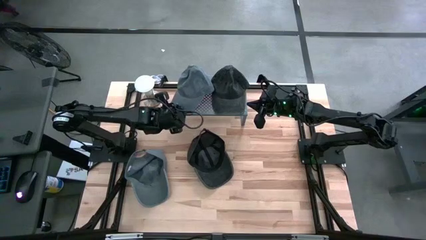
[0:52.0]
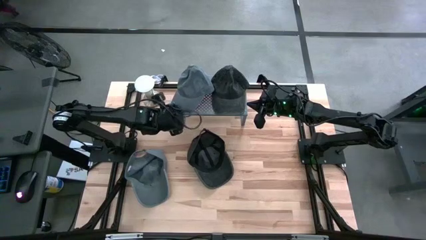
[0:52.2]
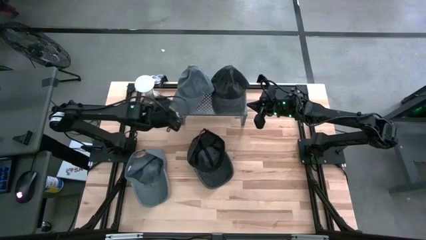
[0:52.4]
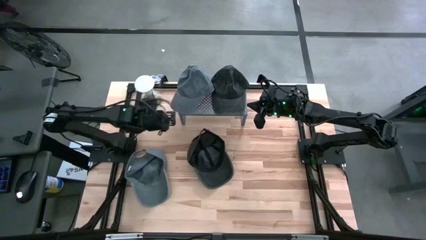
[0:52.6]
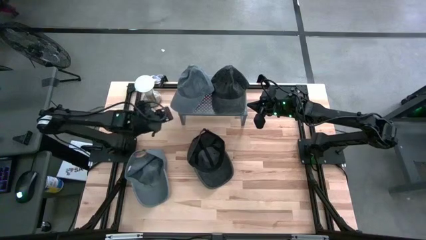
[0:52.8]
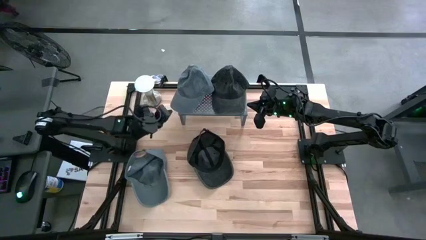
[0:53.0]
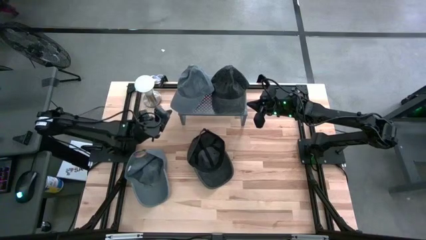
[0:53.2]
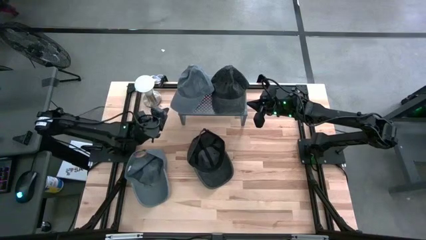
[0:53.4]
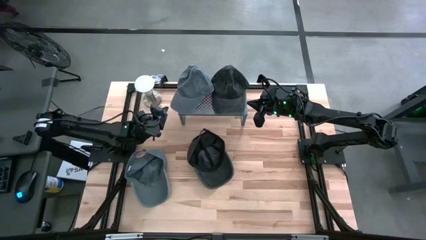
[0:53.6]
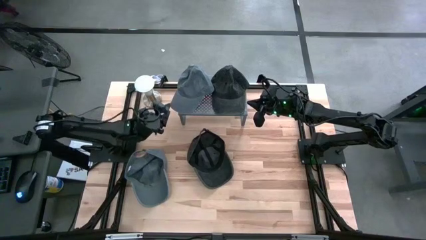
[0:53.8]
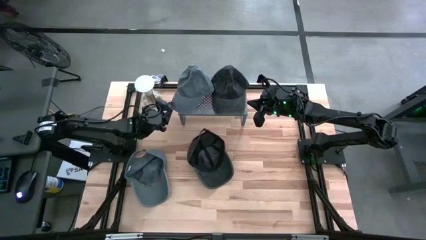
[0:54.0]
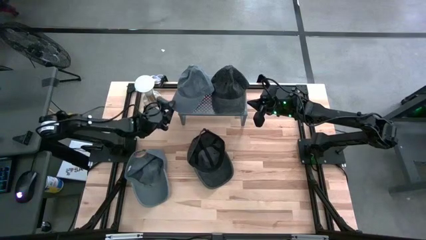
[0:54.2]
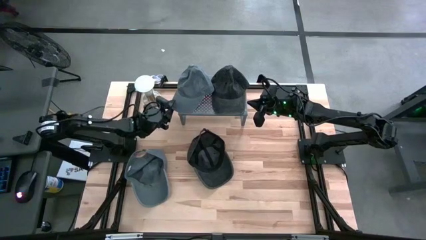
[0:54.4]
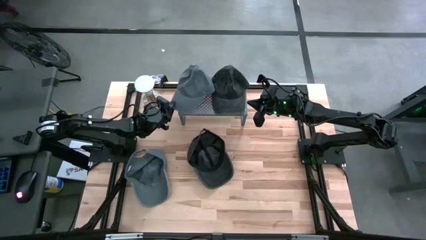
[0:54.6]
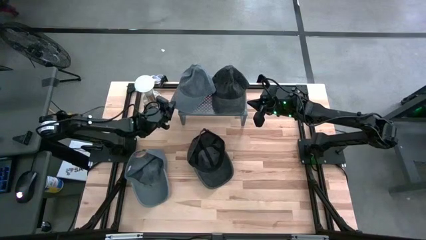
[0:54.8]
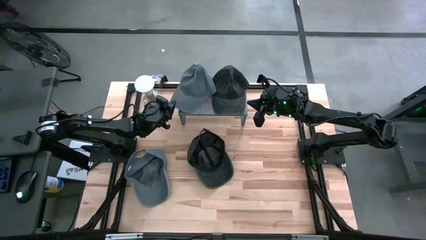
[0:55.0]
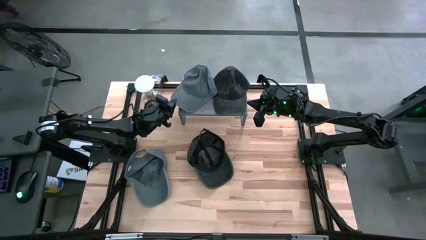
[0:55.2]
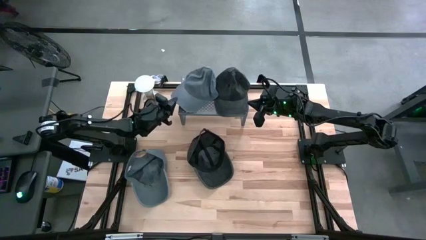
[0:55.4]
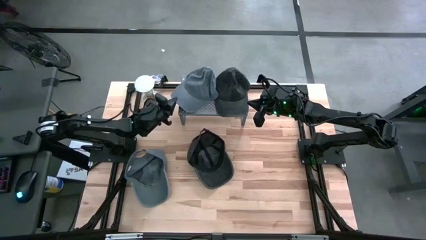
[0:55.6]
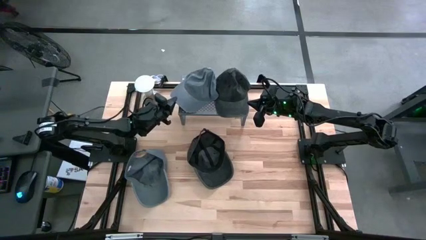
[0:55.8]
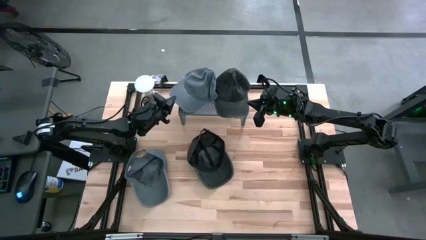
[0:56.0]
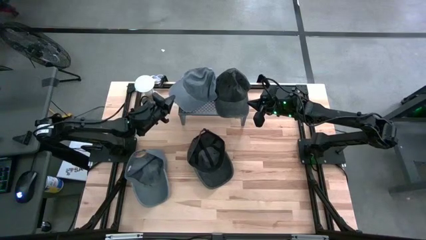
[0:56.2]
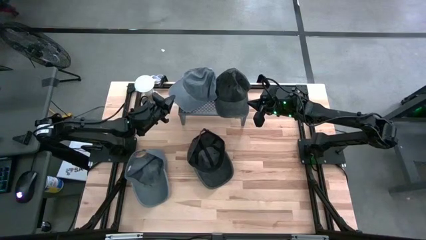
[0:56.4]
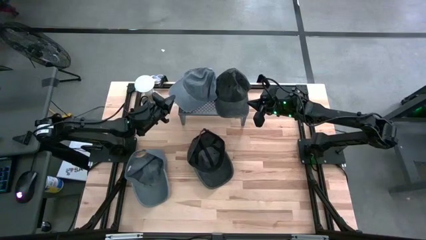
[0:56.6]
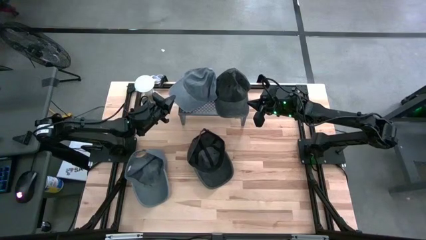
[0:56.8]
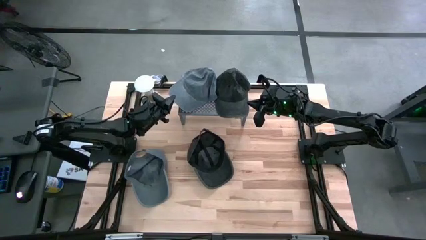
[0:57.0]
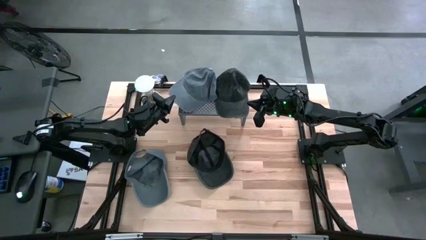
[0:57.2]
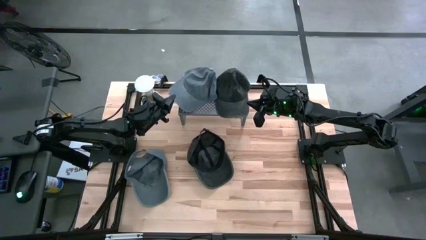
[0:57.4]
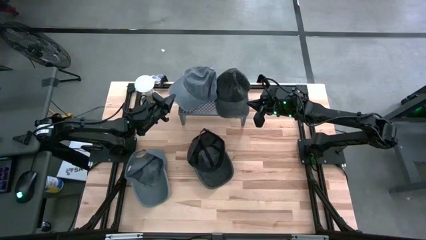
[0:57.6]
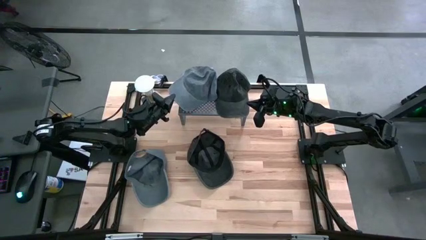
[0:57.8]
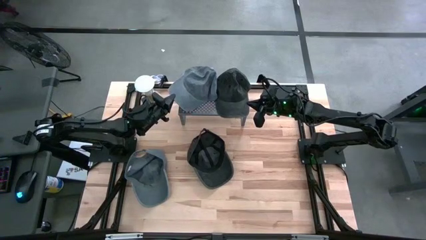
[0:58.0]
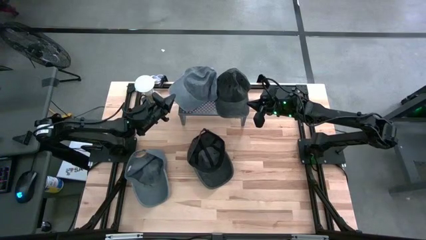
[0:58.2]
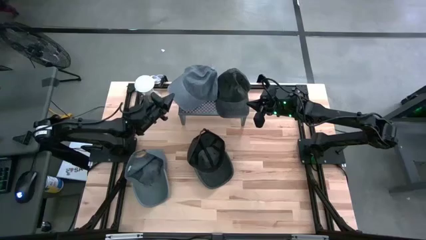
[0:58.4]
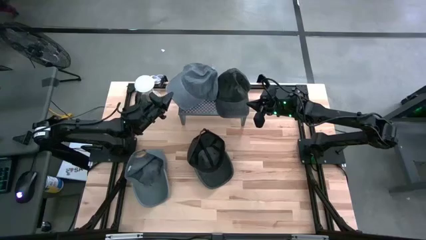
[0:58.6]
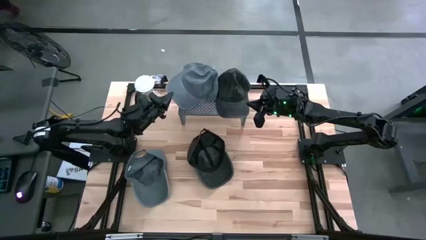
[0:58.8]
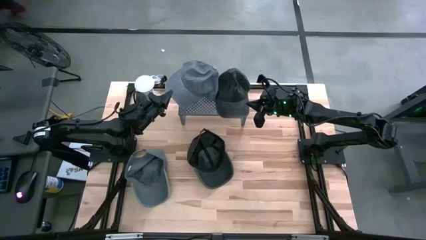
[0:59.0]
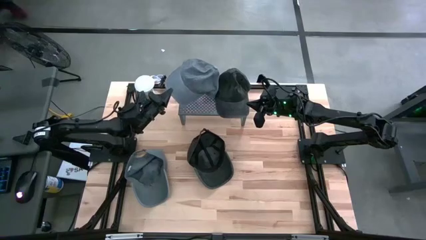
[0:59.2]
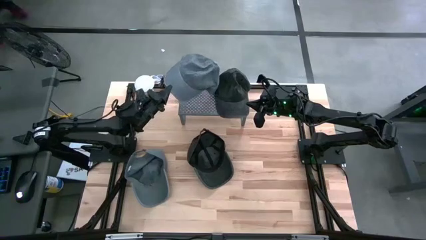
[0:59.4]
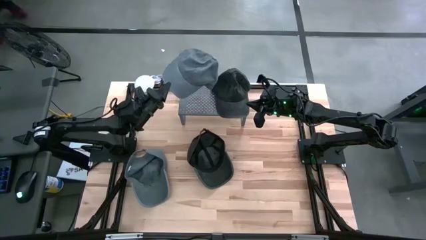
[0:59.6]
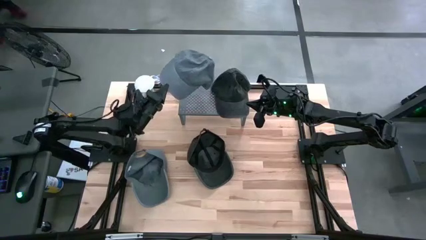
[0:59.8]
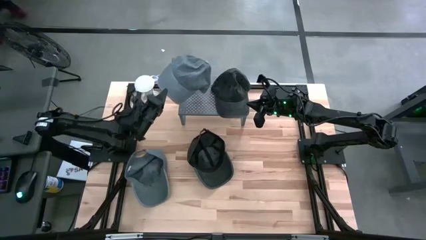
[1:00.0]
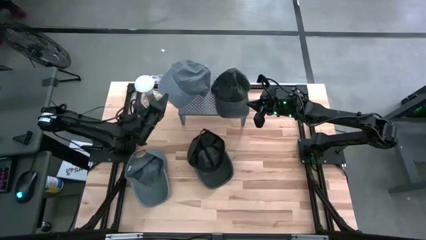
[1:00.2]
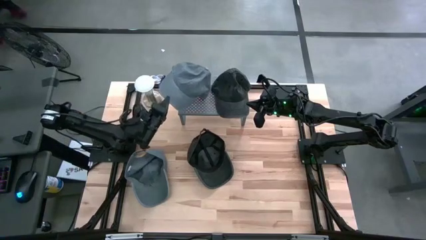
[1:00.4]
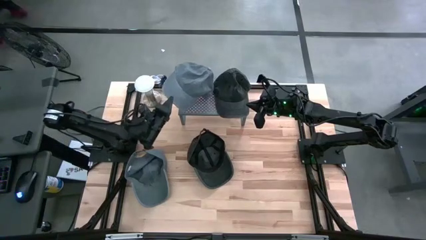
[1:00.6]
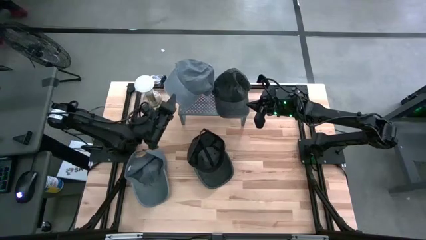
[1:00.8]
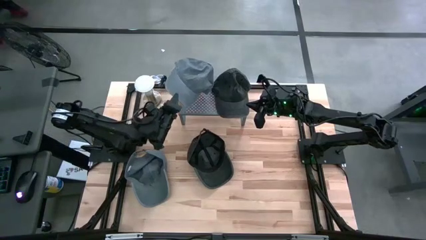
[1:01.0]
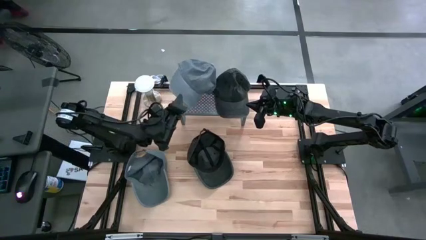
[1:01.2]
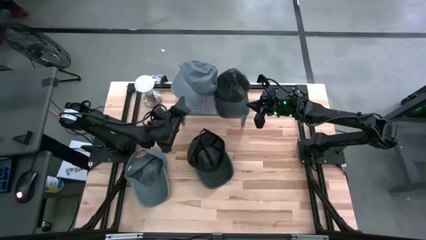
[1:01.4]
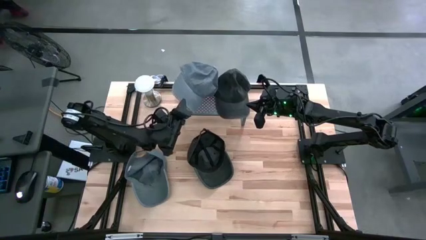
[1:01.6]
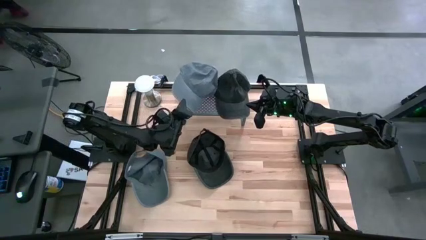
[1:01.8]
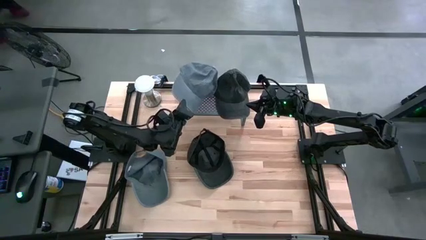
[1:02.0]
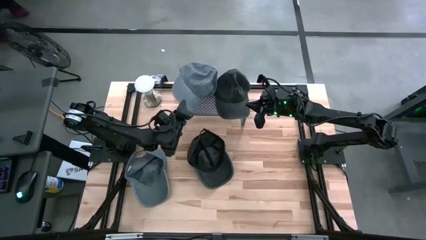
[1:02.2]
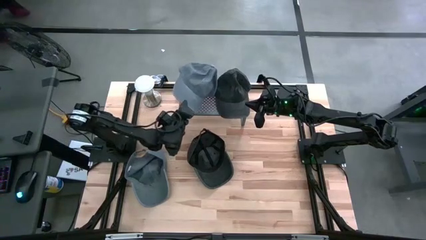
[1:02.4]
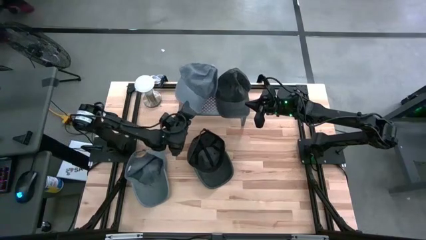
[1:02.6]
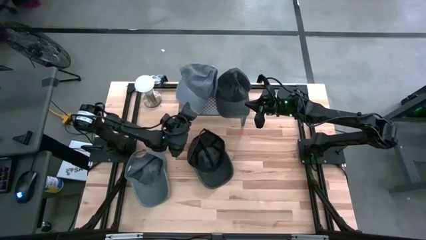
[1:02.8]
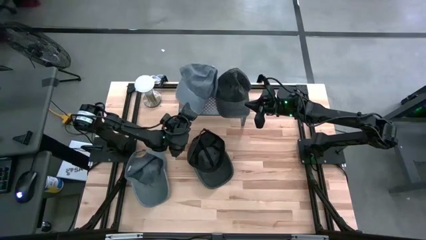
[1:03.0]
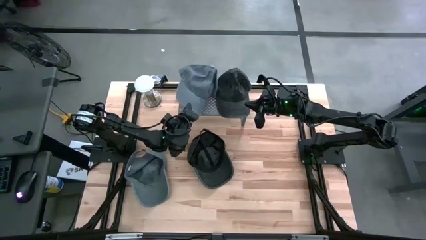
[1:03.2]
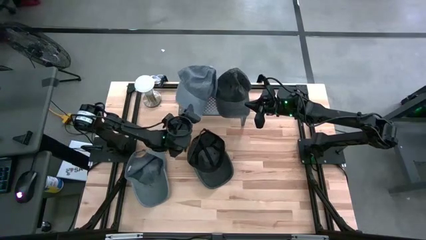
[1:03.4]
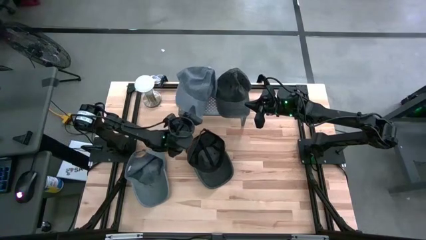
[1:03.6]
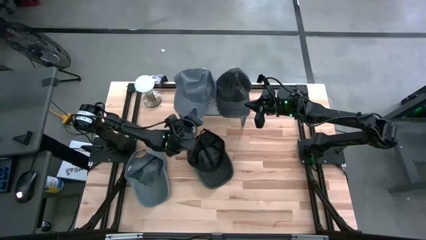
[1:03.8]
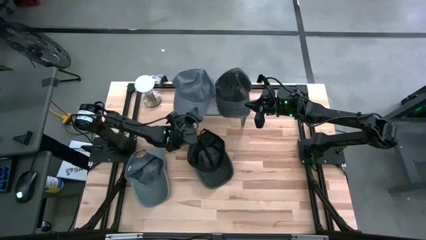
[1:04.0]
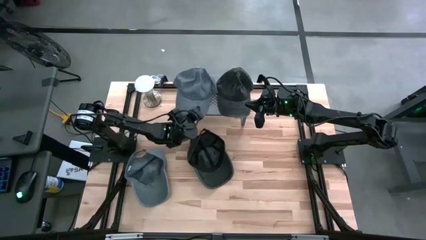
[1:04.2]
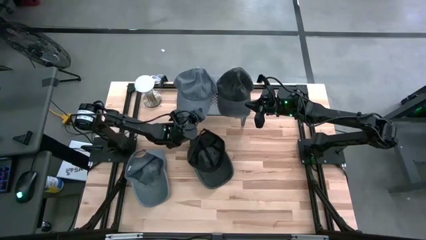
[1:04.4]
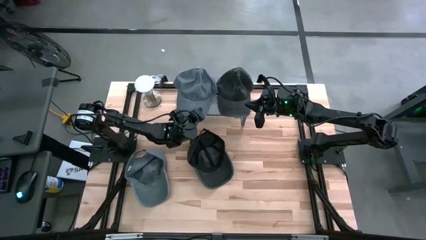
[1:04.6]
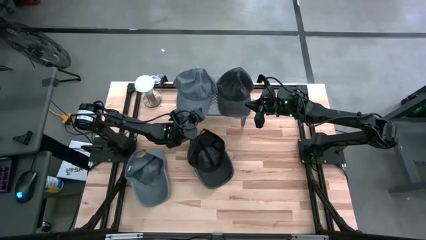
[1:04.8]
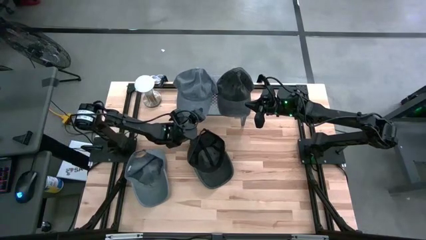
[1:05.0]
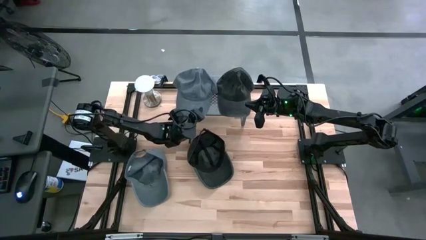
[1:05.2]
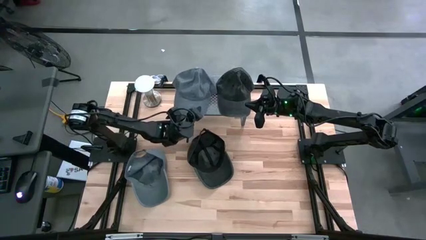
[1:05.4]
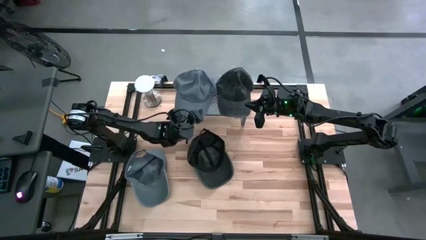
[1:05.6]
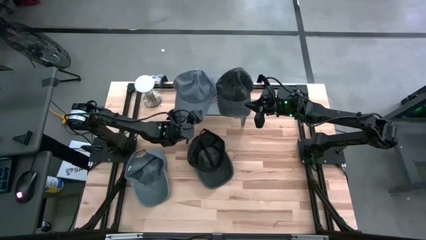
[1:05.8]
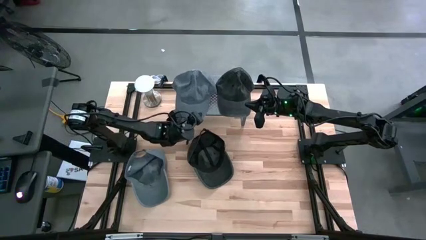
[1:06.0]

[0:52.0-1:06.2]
Task: Pick & Place hat
Put the right gray cap on the shelf
